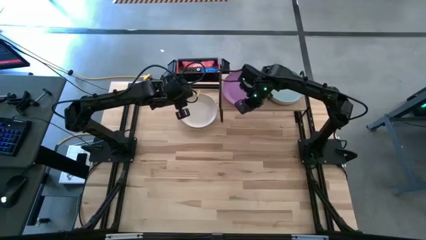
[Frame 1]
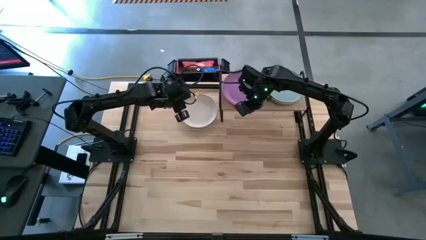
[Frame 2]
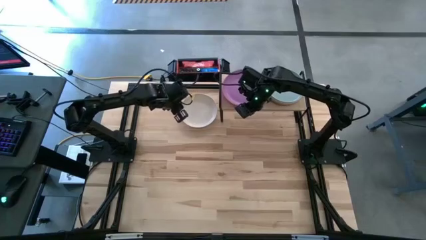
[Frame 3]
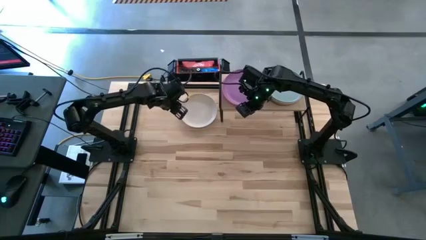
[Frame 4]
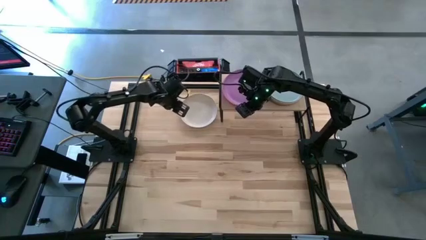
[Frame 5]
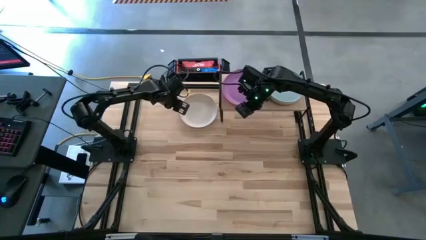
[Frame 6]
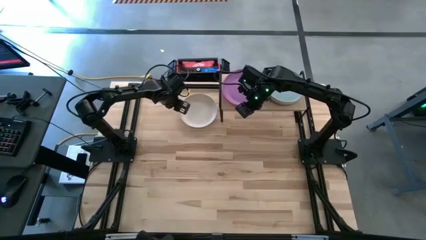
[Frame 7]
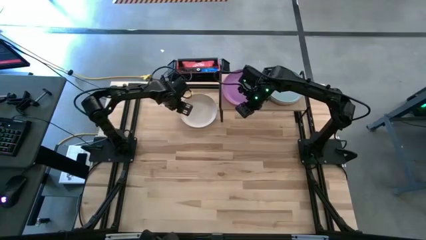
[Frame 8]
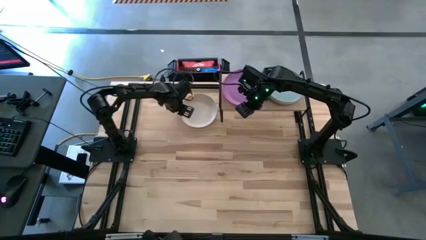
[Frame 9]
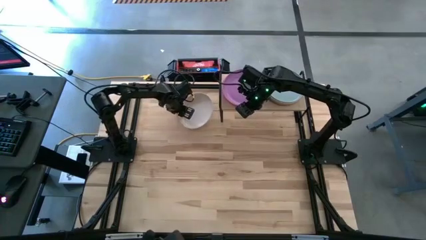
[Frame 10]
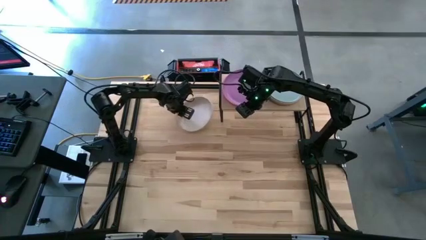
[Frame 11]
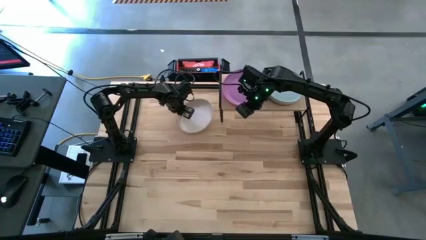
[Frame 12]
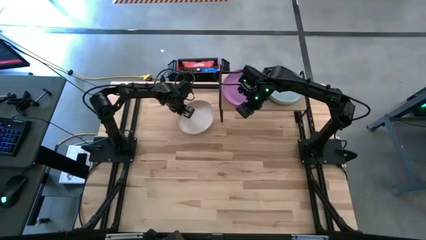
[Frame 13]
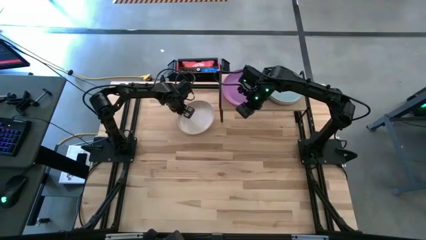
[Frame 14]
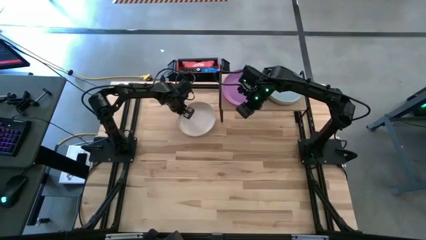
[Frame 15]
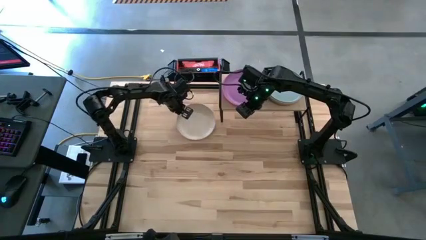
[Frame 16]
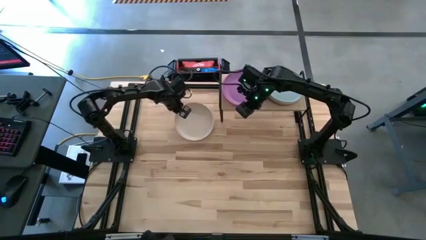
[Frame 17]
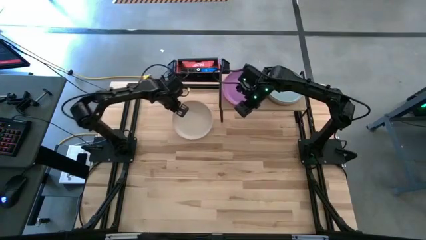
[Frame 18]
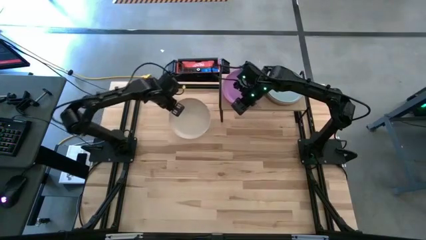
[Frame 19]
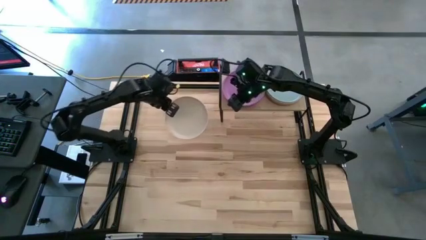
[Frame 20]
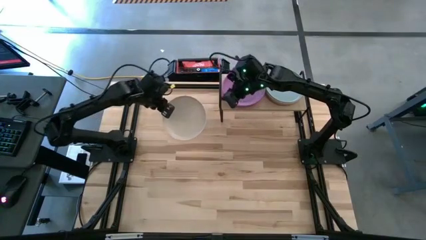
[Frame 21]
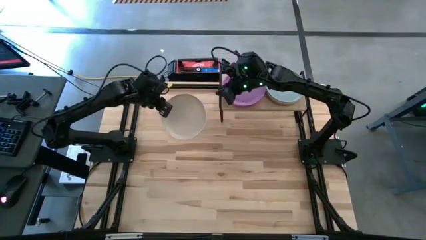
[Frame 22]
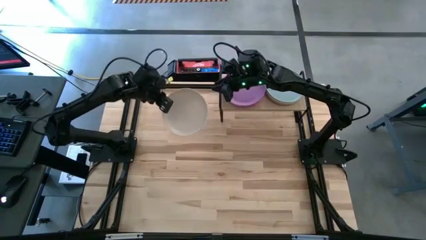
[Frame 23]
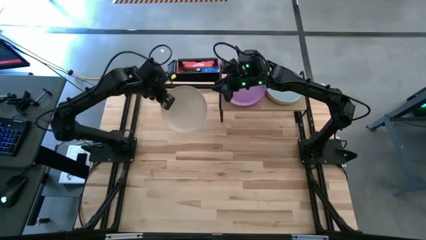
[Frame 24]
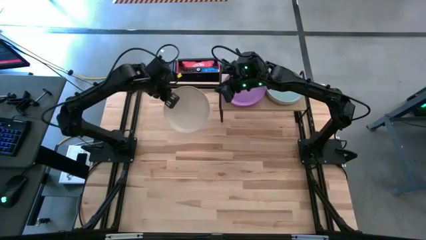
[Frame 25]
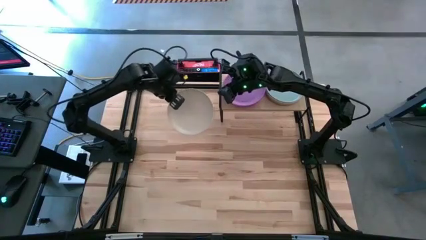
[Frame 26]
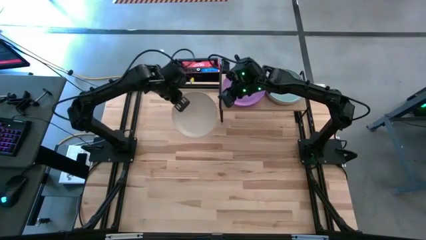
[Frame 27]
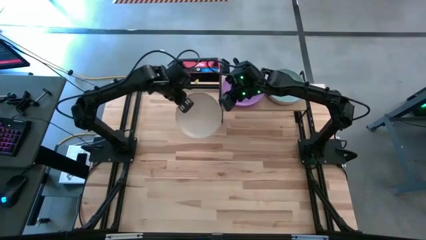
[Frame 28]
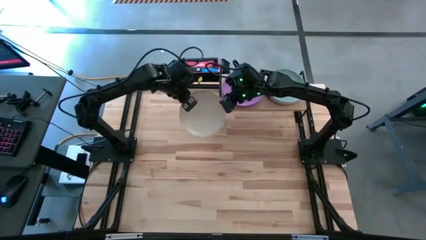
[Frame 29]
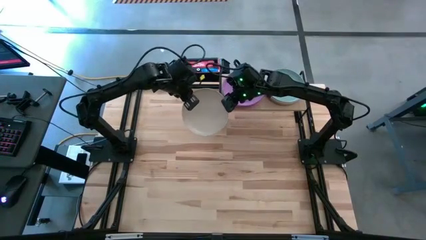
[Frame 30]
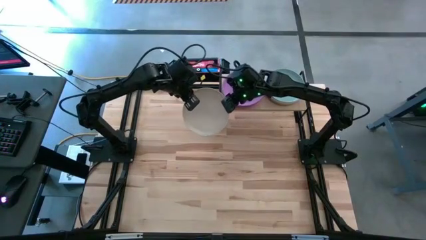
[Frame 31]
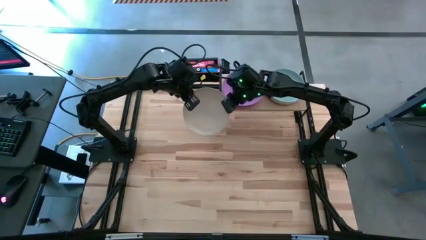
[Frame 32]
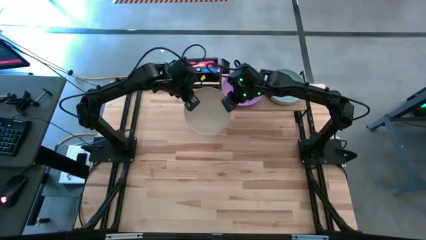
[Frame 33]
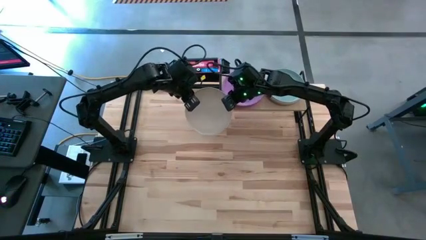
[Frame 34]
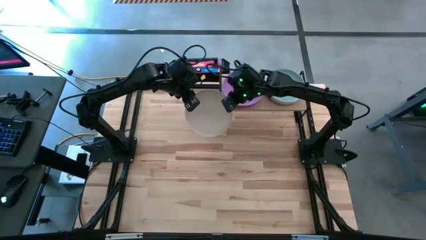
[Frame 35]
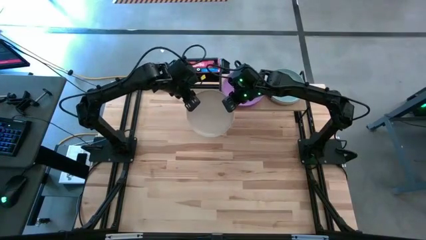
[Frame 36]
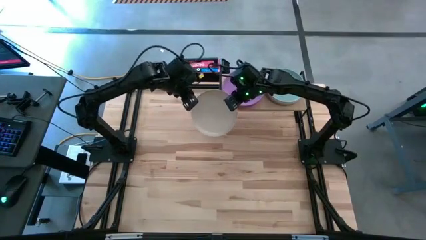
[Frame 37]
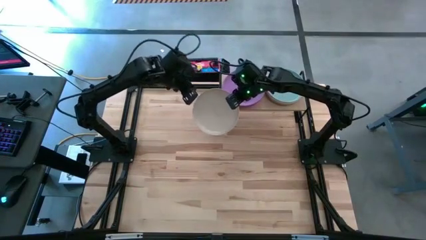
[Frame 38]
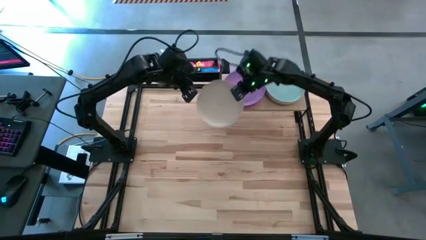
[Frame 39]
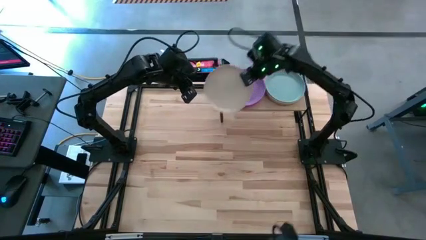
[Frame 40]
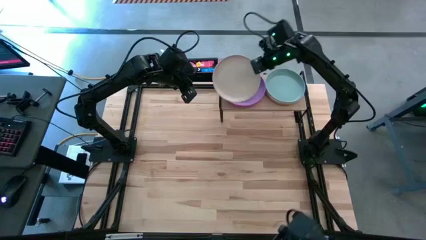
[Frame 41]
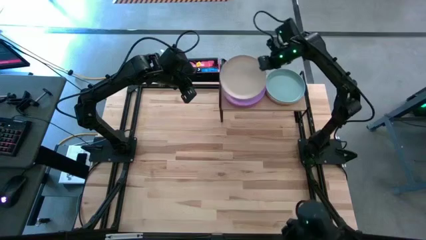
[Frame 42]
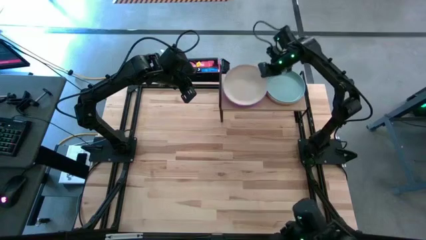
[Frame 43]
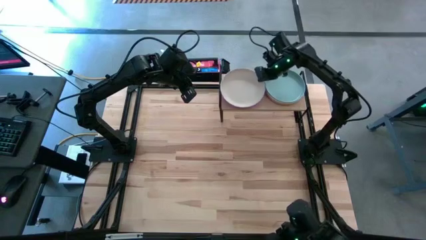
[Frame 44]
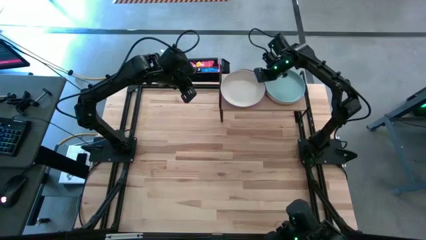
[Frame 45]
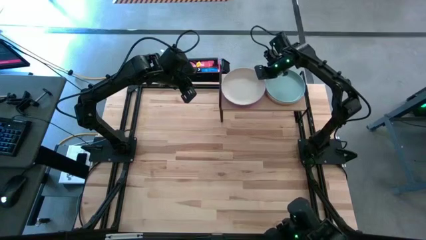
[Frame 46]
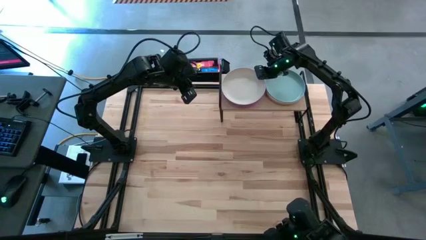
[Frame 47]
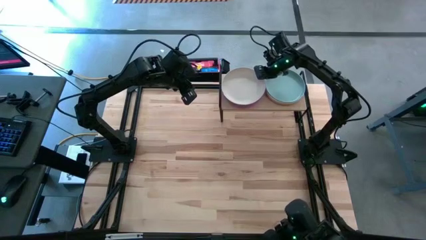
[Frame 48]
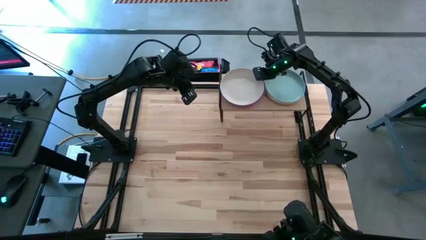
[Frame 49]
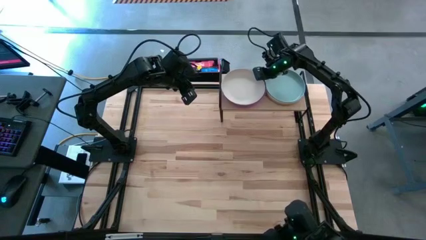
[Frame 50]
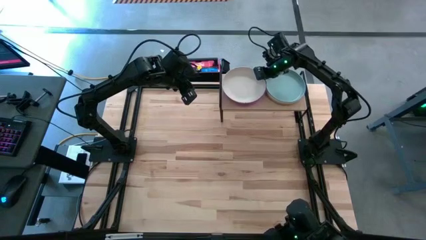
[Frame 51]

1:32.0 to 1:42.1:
Task: Place and stack plates onto a shelf
Stack the white plate on top of the purple plate on the shelf

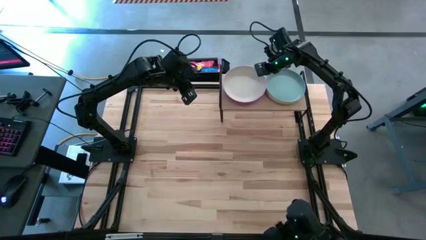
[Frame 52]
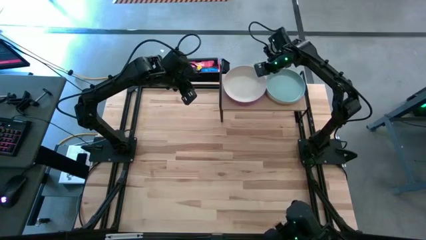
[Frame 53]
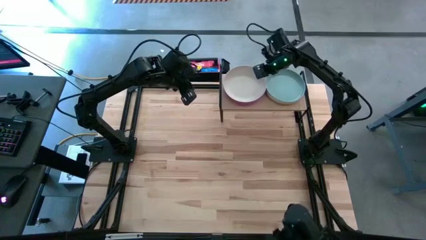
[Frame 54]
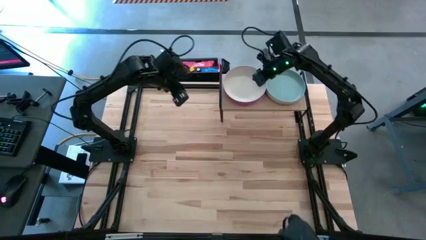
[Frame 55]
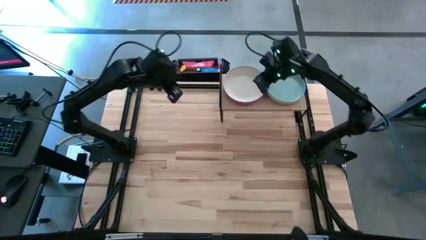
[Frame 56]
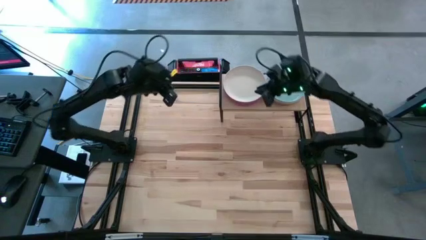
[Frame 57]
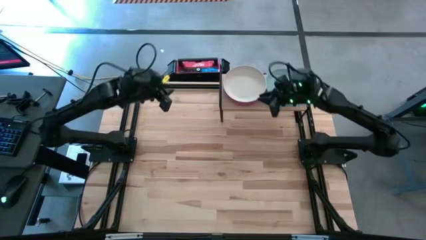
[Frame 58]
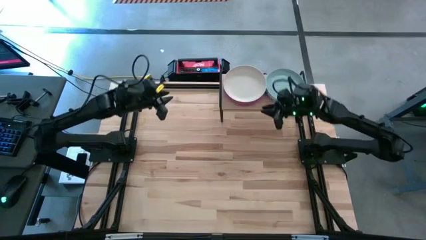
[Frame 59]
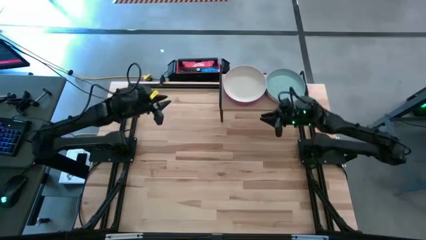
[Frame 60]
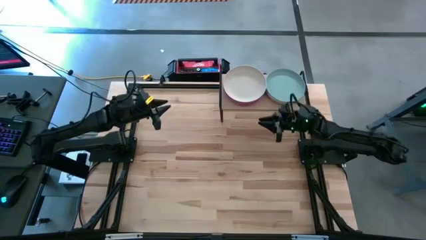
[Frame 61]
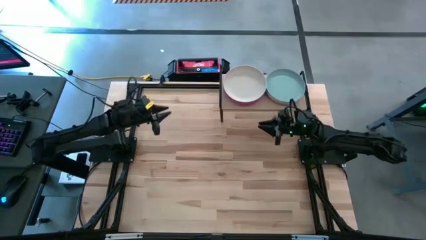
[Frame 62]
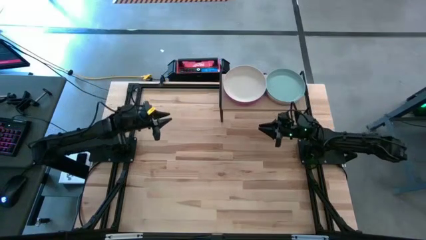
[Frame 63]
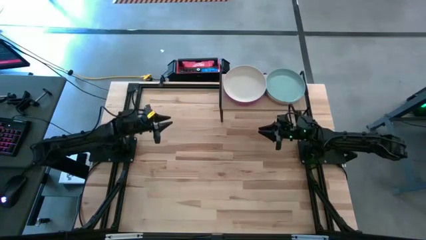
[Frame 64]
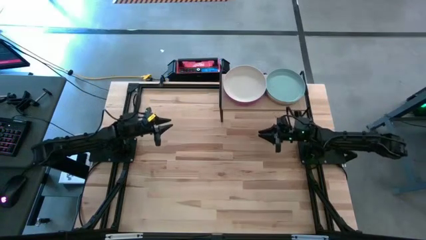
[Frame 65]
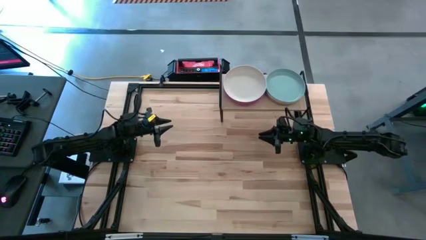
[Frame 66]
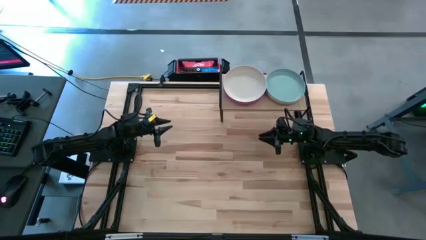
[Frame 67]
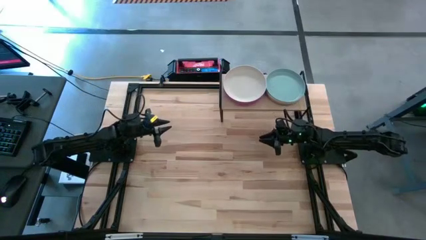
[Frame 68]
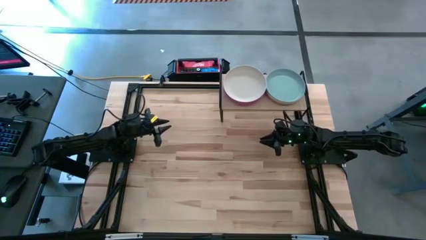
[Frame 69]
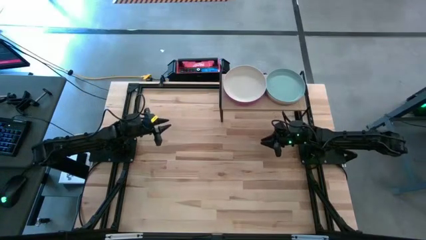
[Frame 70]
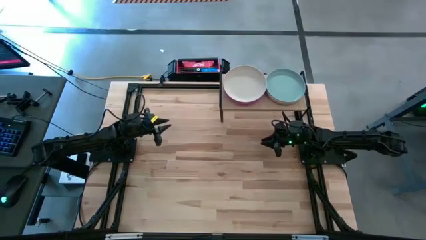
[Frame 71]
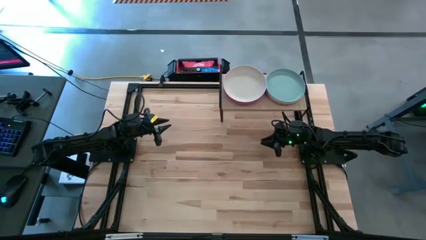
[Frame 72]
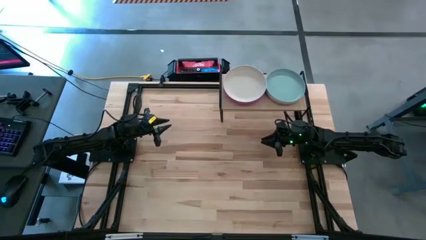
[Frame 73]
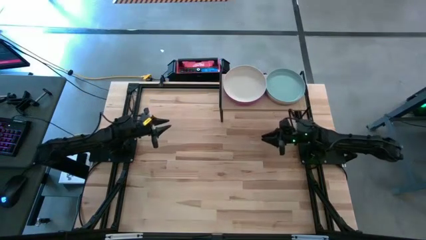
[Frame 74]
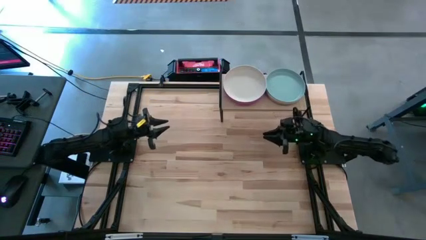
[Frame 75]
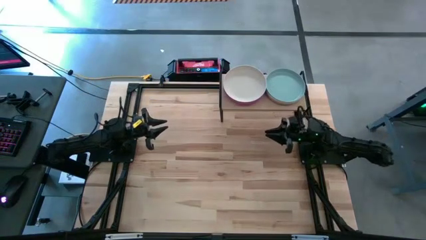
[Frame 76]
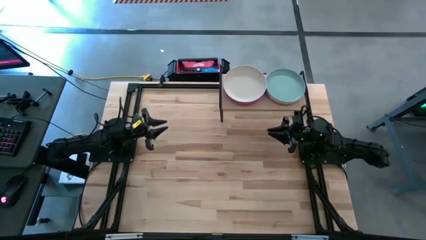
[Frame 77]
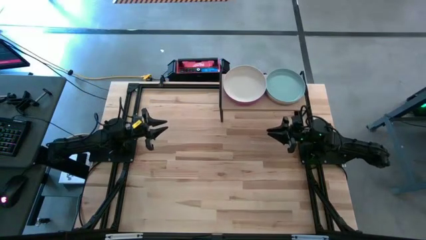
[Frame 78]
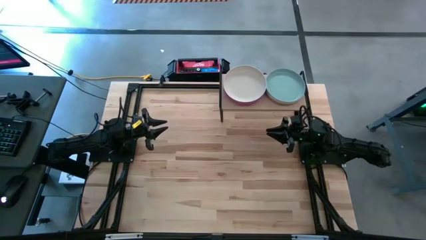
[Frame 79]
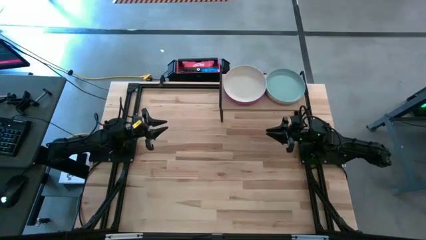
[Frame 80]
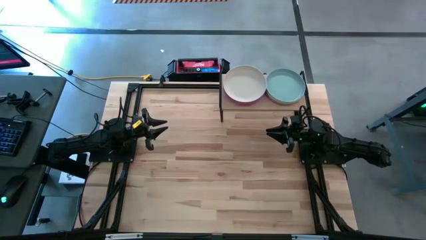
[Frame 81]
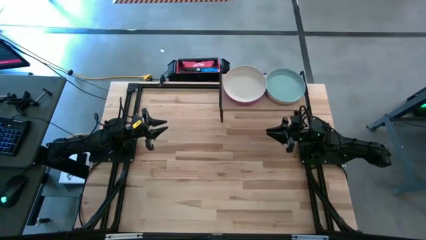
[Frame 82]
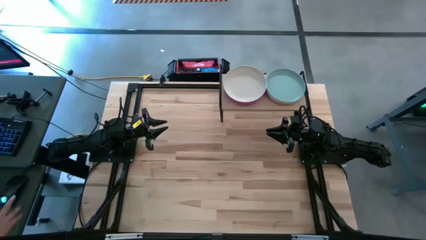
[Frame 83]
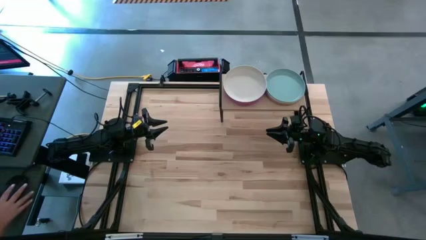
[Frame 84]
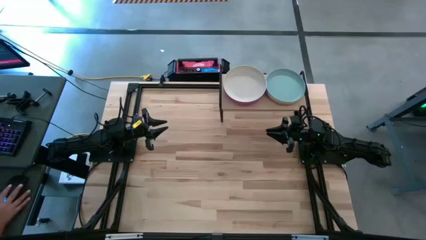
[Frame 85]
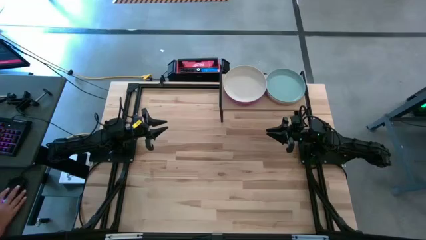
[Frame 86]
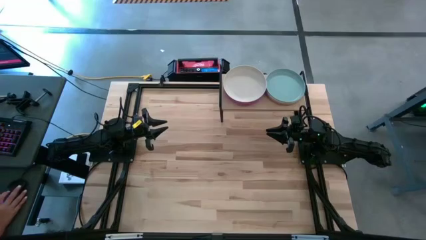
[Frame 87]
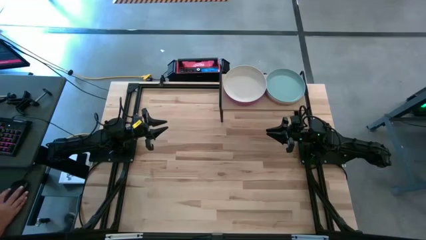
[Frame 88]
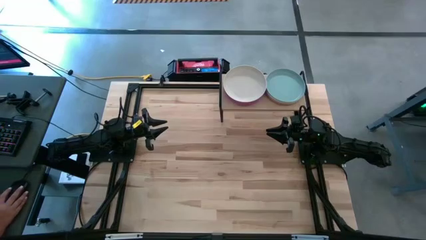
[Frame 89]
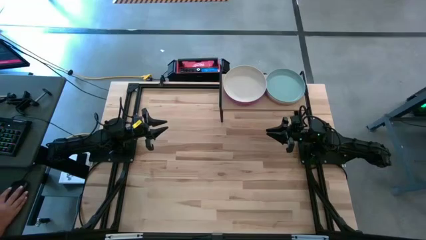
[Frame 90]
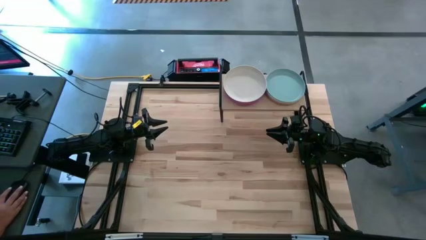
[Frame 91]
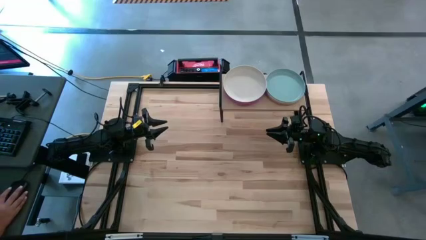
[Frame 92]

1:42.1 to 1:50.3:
Return to Home Position
